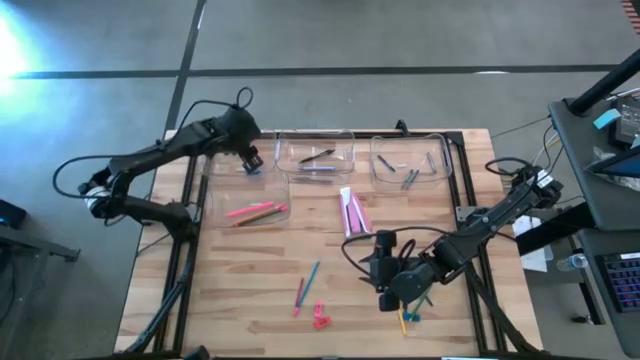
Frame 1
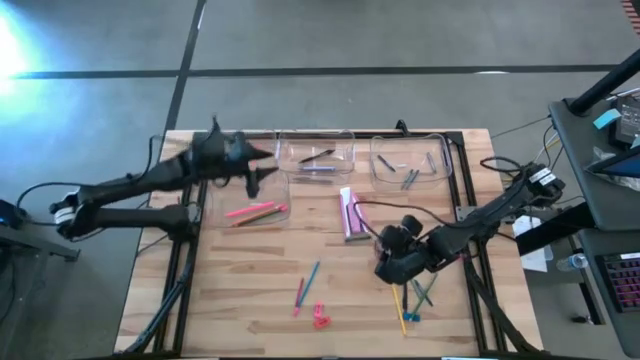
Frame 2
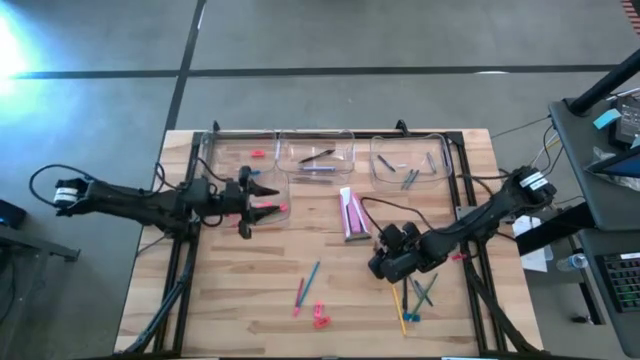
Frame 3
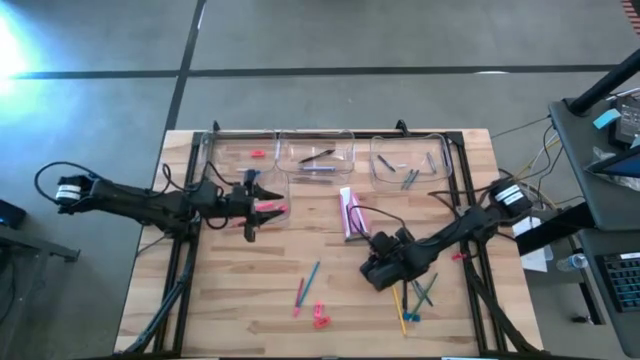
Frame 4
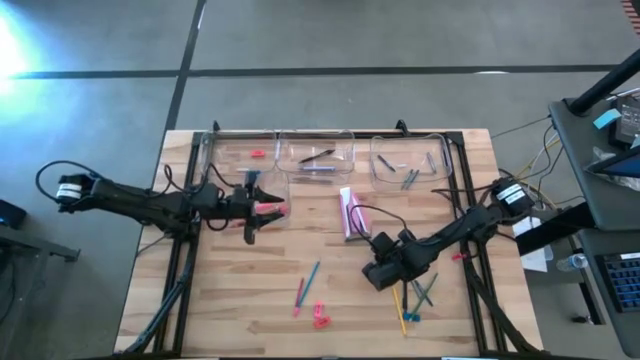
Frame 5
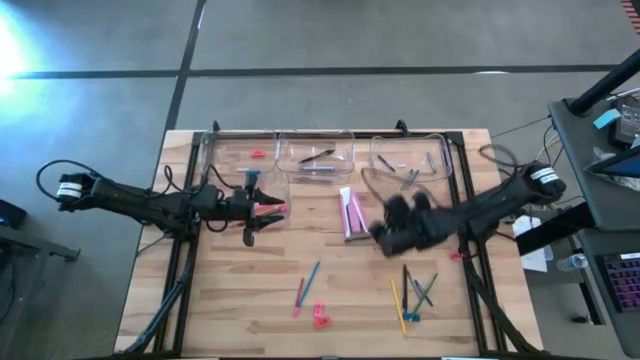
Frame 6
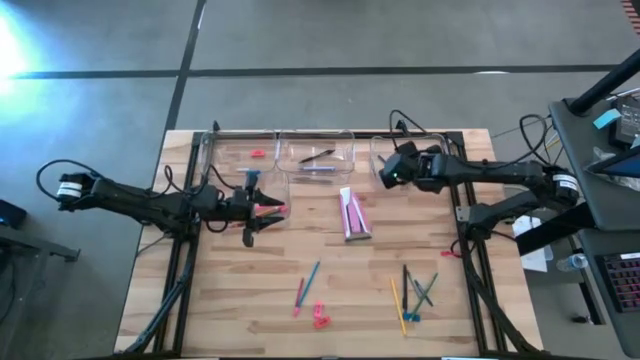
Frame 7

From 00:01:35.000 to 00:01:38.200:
Task: Sort crayons/erasers/pens/pencils in bins
Put the red crayon into the top right transparent bin

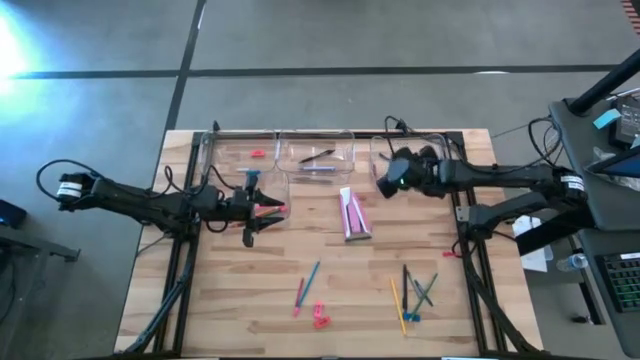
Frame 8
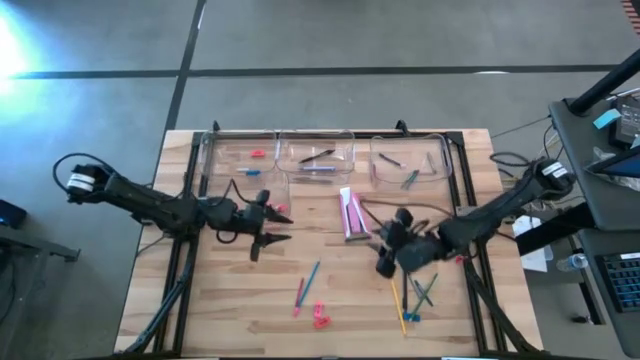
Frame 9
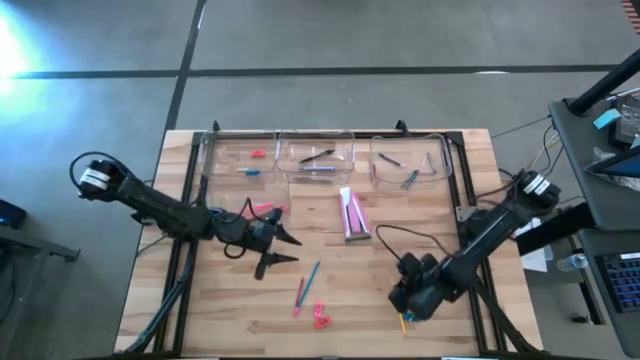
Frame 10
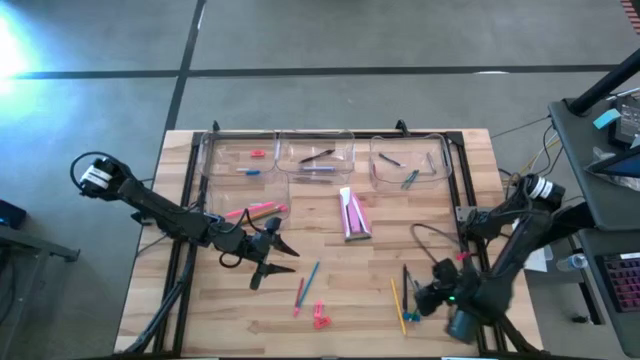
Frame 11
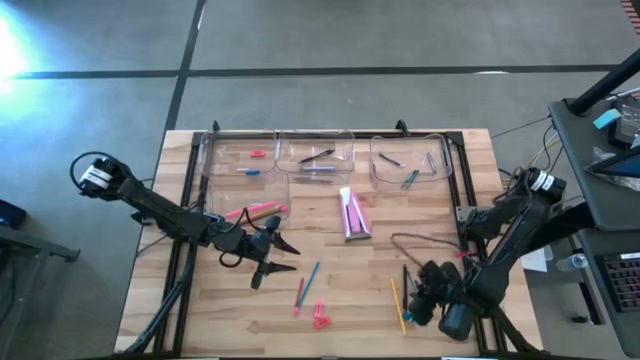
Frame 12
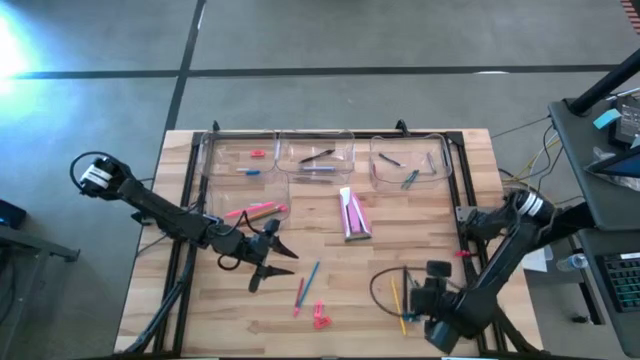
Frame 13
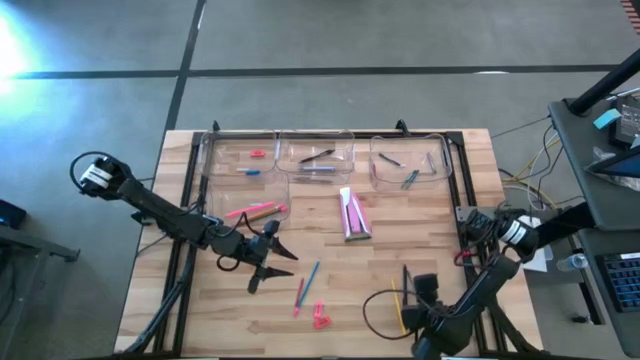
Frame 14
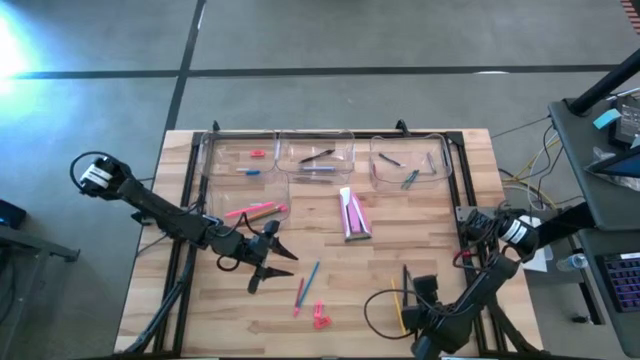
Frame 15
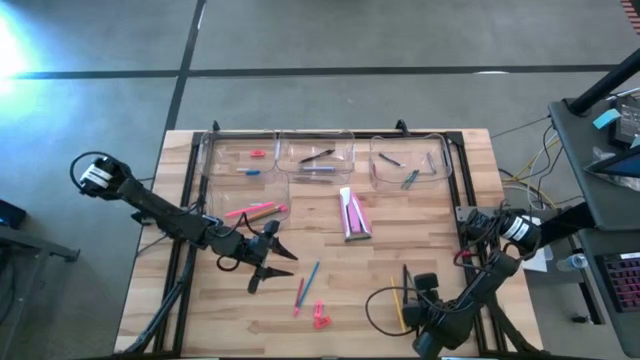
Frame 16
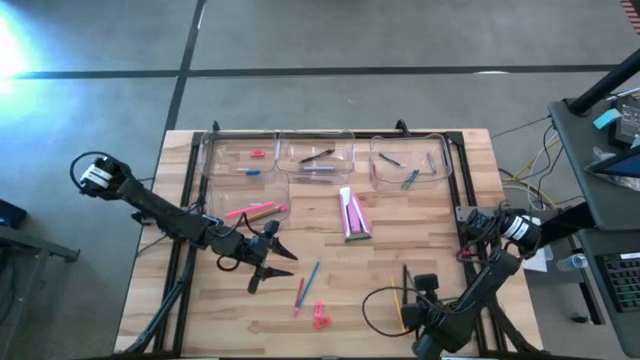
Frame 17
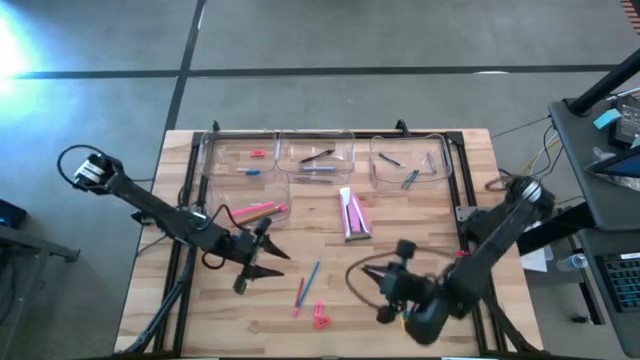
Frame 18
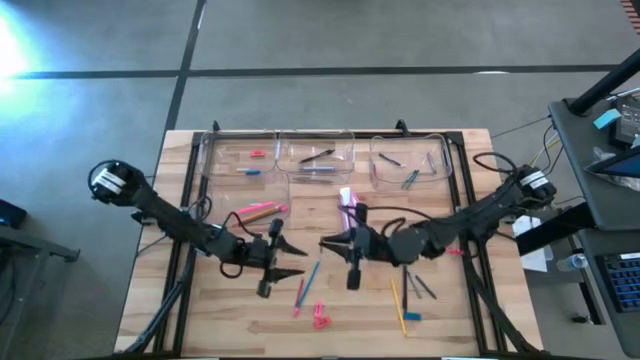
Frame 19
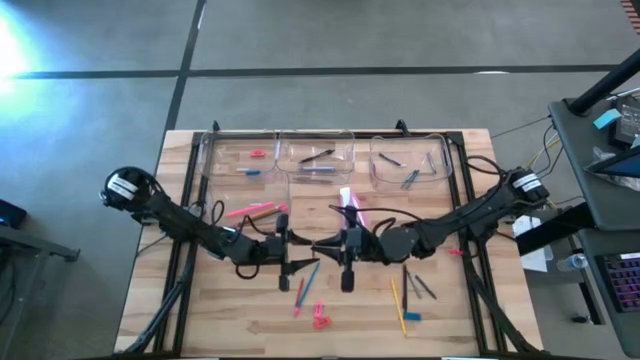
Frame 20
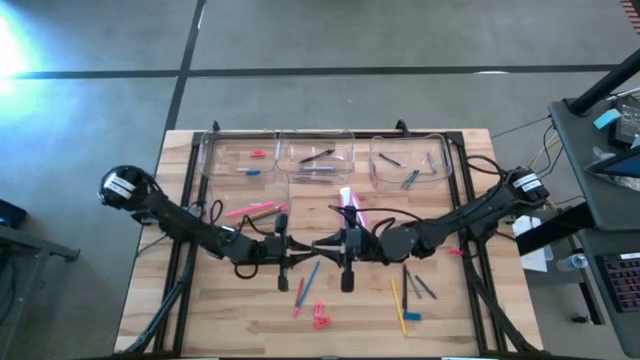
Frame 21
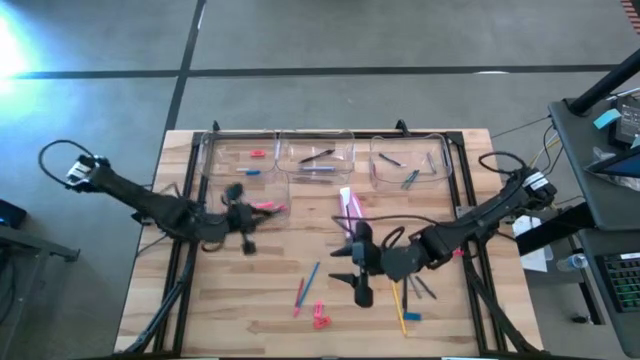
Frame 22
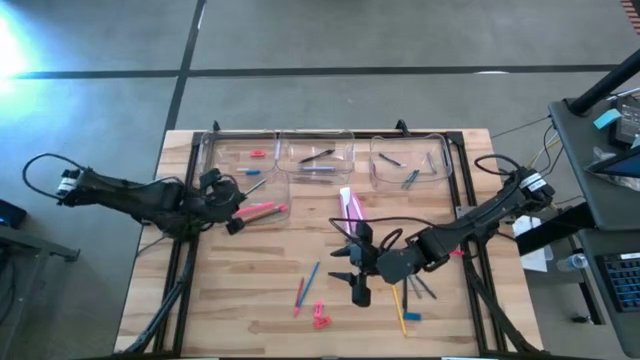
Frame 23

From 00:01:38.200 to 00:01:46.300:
Put the green pencil into the bottom left transparent bin

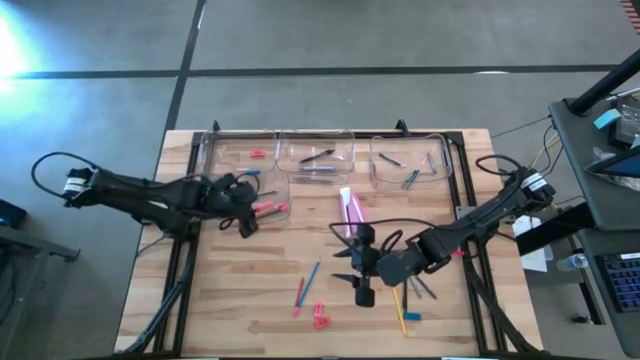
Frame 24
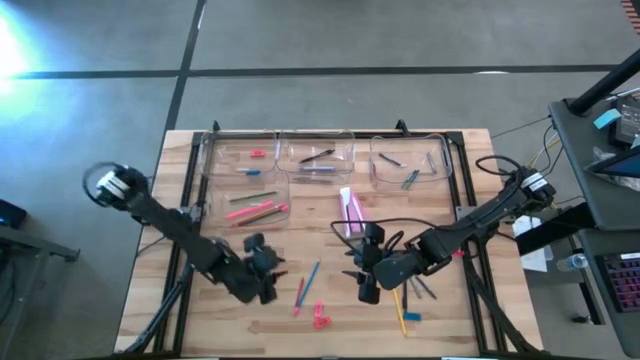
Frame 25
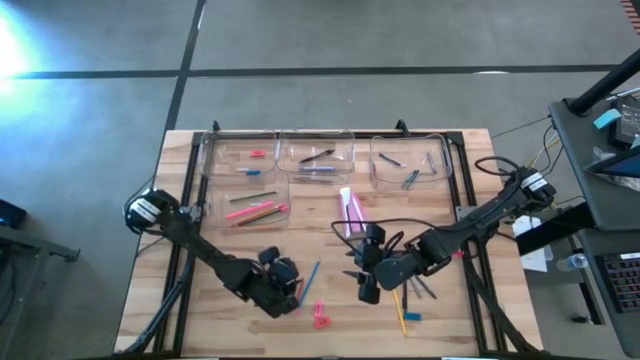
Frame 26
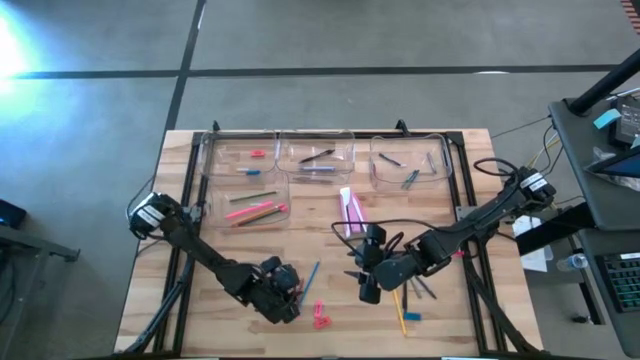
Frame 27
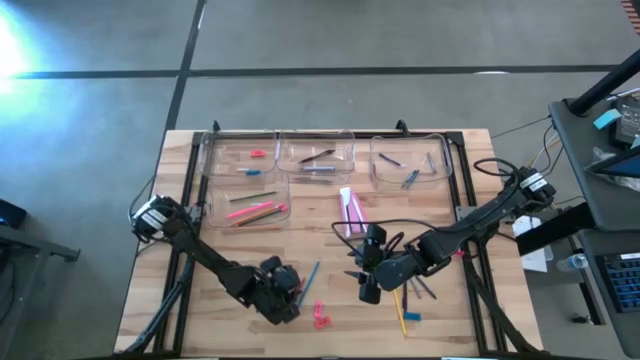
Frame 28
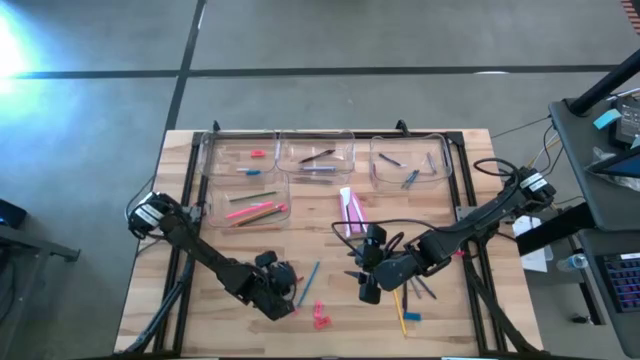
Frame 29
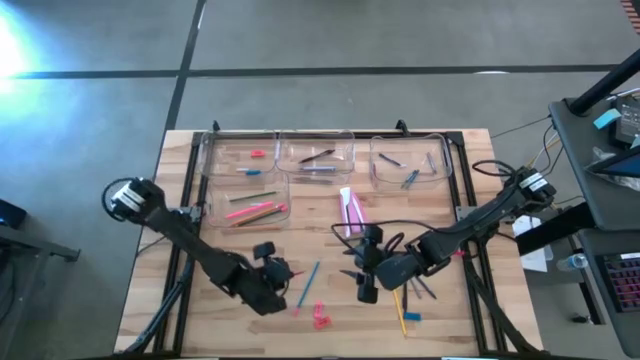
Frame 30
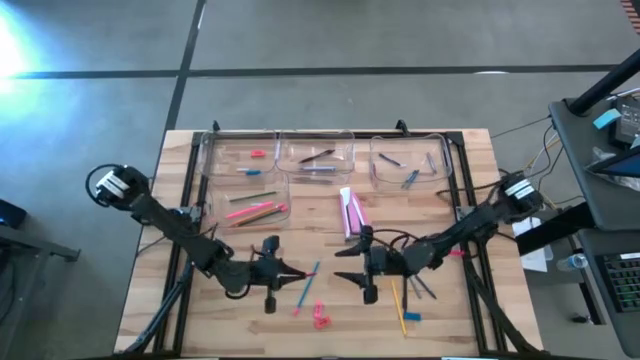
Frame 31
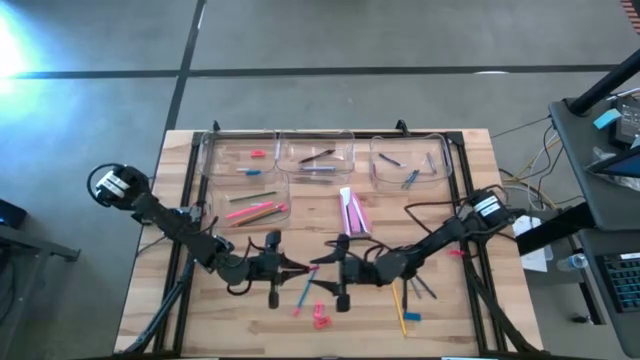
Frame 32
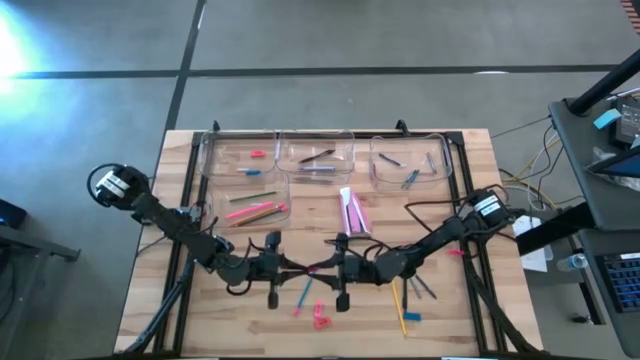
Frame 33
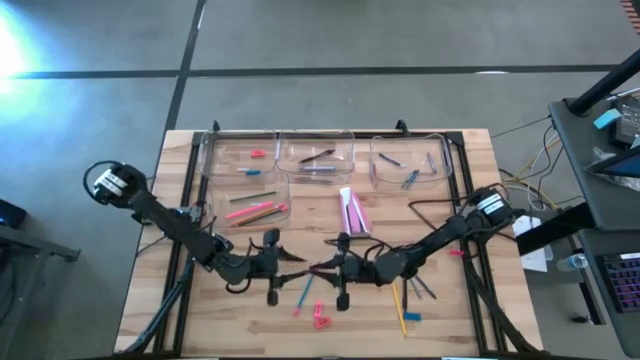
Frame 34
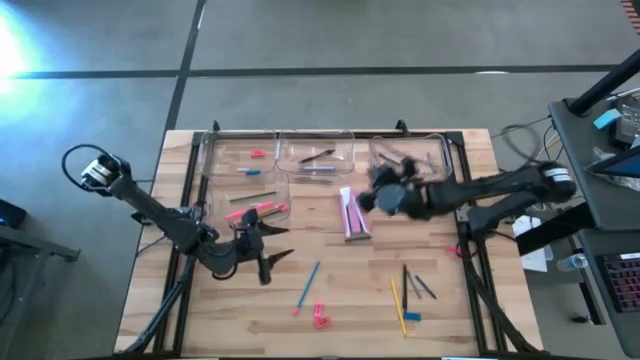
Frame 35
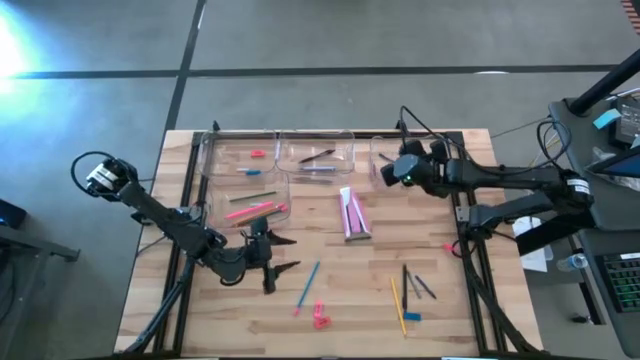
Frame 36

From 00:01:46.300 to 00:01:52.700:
Put the red crayon into the top right transparent bin

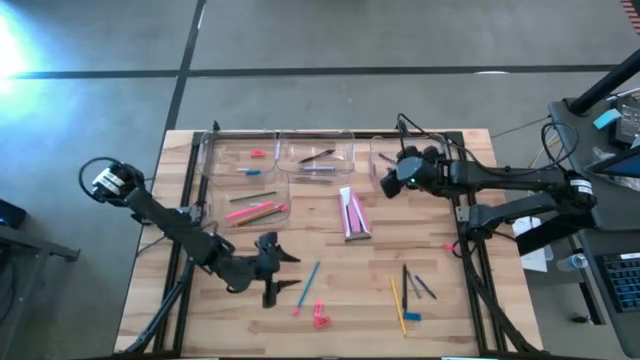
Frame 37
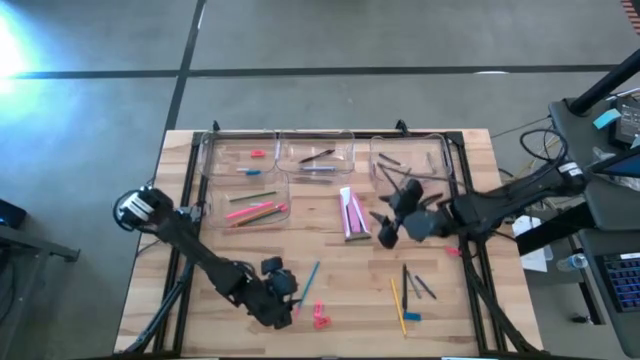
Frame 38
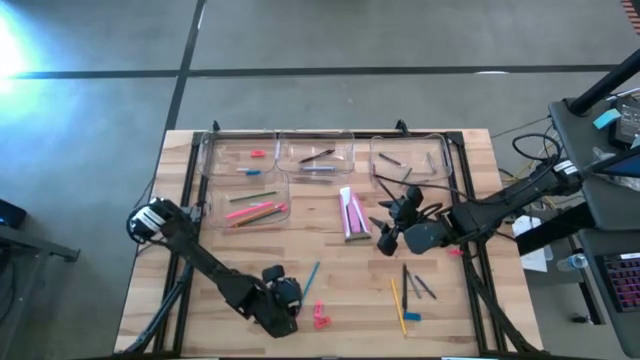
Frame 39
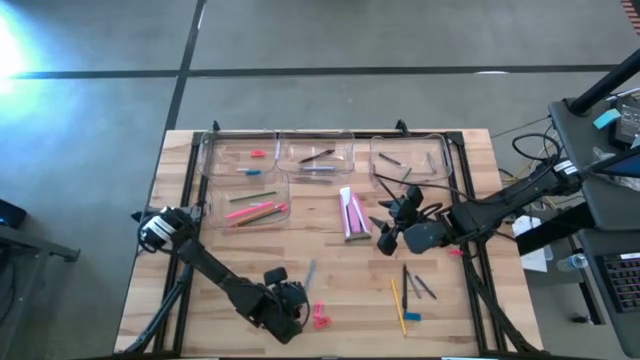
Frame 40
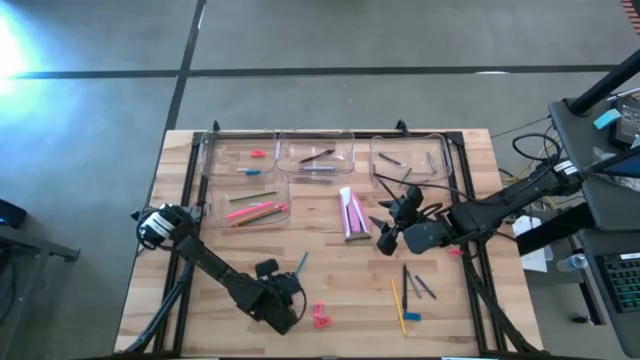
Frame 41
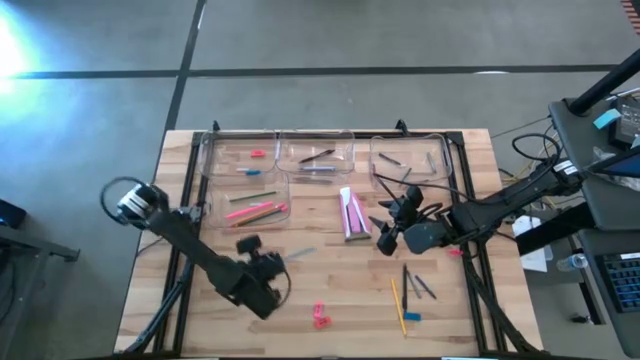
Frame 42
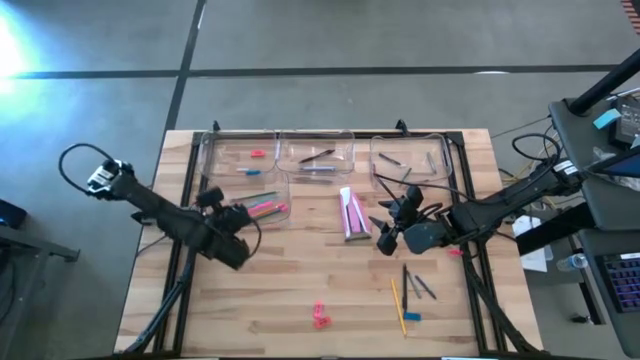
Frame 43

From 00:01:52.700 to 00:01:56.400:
Put the blue pencil into the bottom left transparent bin
